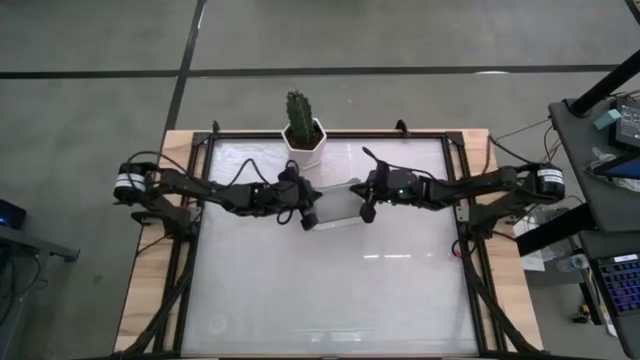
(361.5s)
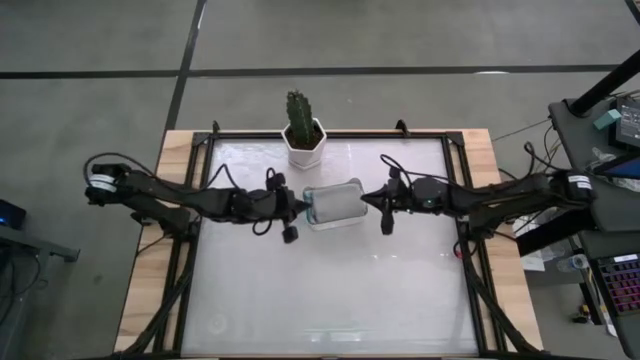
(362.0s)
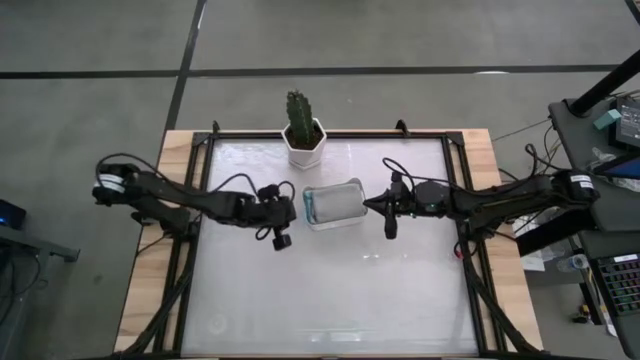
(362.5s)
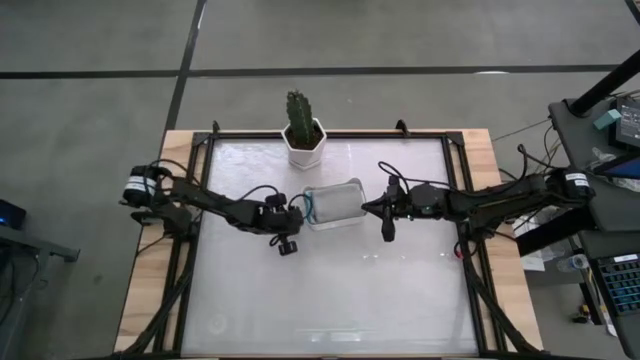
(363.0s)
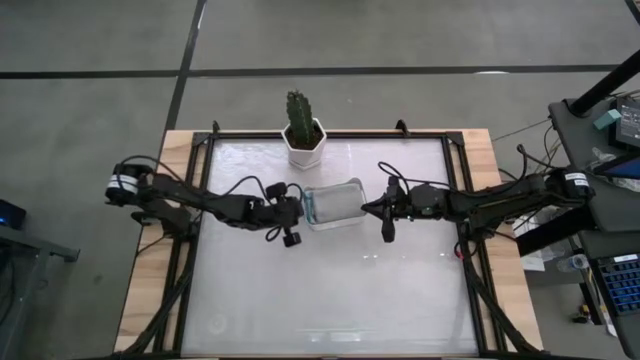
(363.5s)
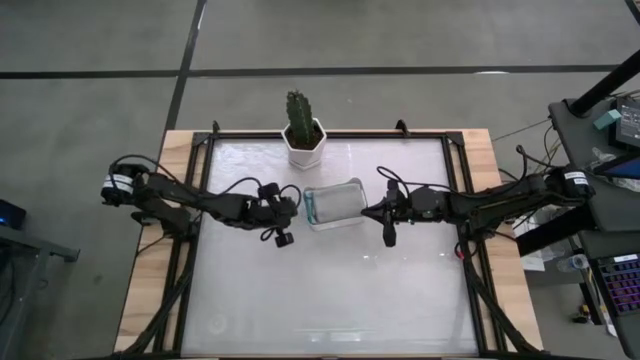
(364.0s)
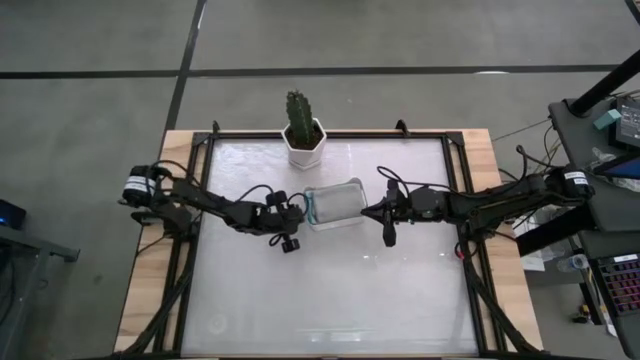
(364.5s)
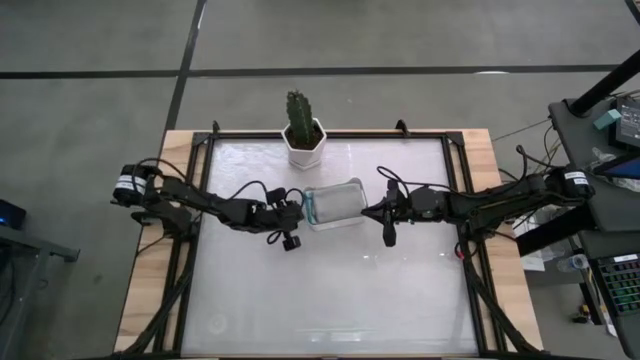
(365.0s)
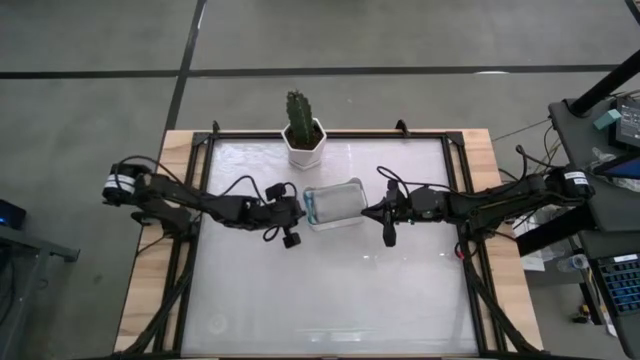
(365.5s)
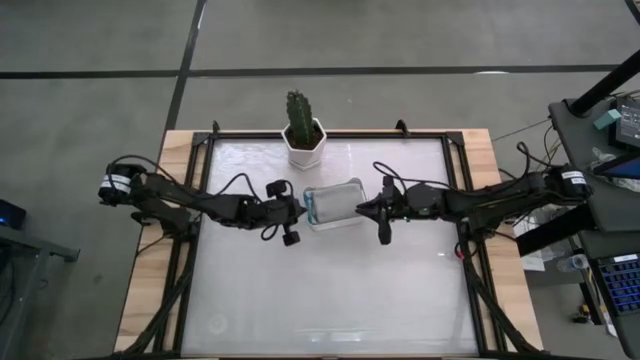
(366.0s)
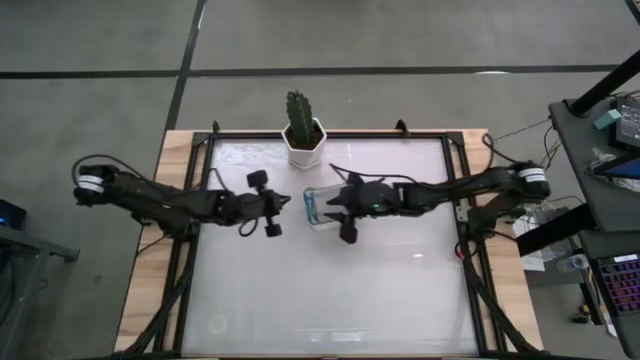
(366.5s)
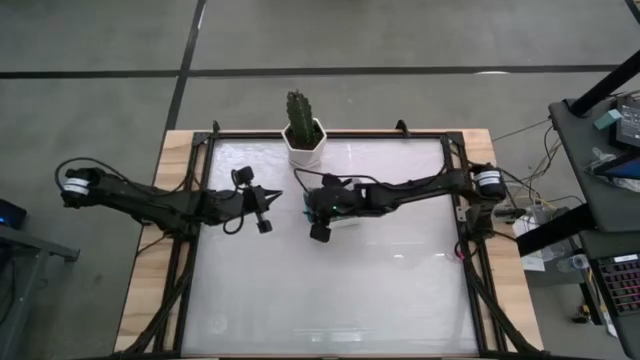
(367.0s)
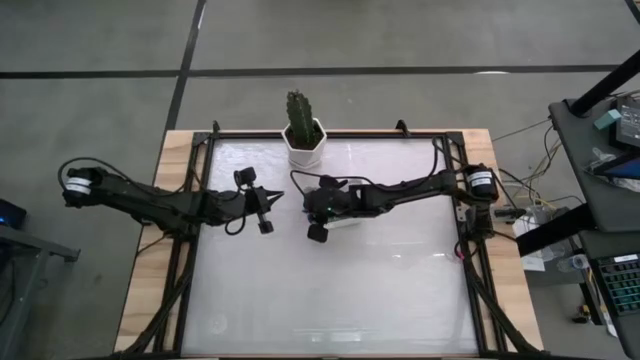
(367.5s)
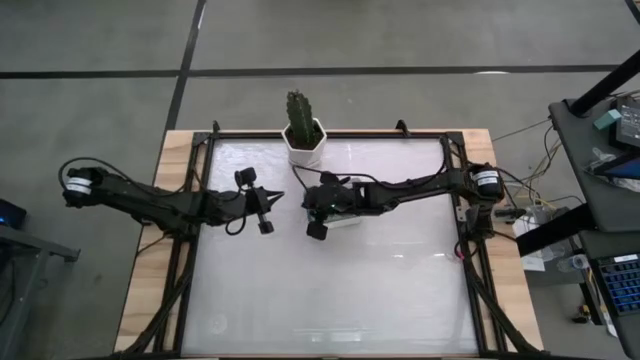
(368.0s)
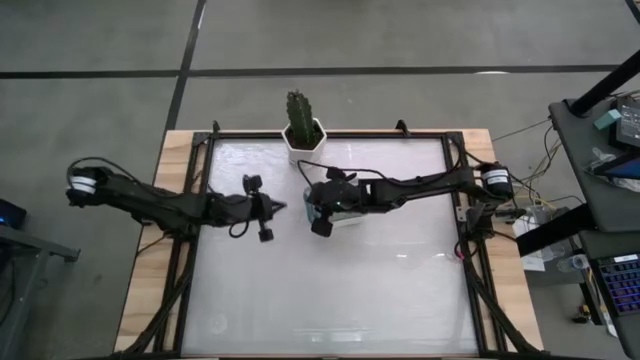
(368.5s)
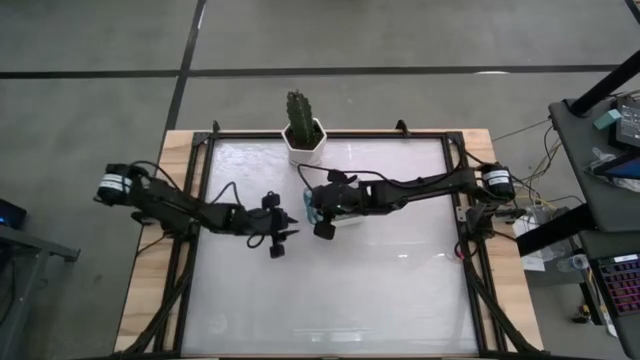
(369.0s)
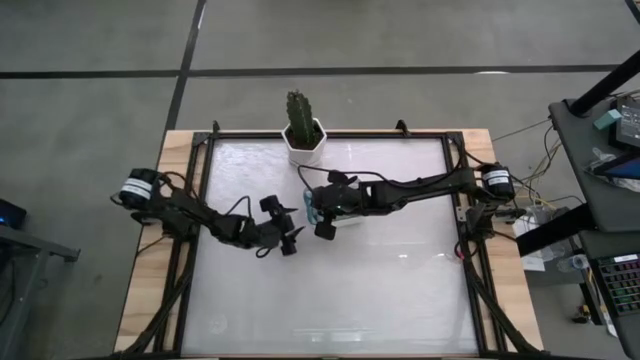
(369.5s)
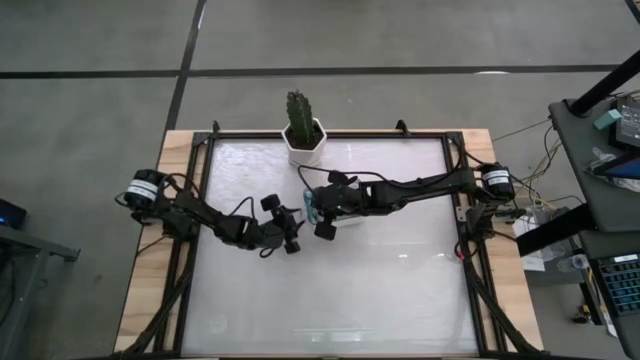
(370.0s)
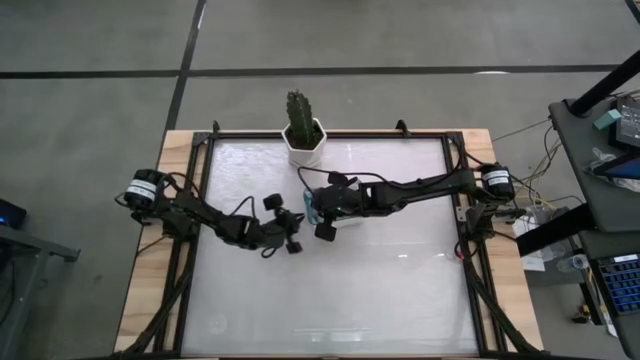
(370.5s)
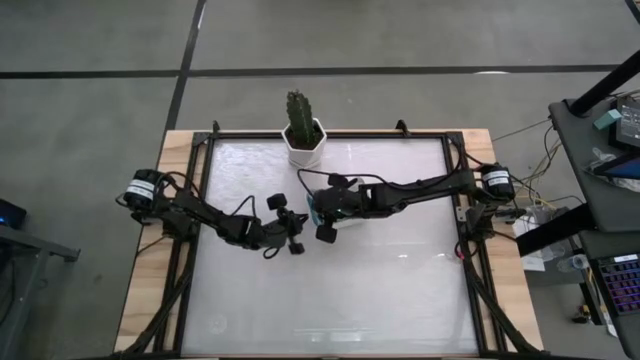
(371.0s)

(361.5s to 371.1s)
Task: Fold microfiber towels
Adjust the white tag

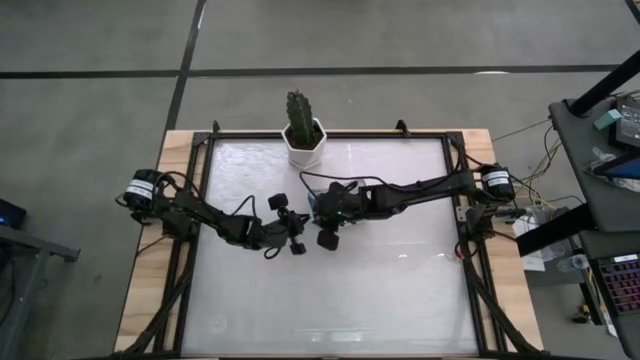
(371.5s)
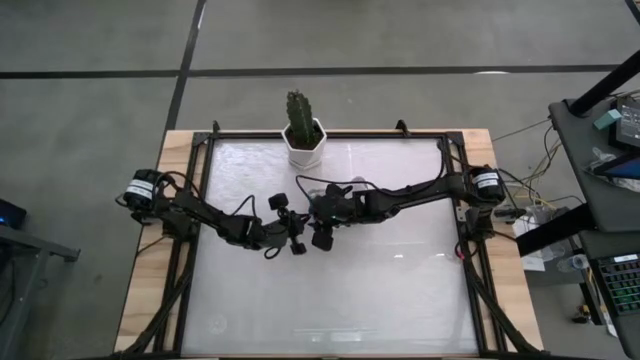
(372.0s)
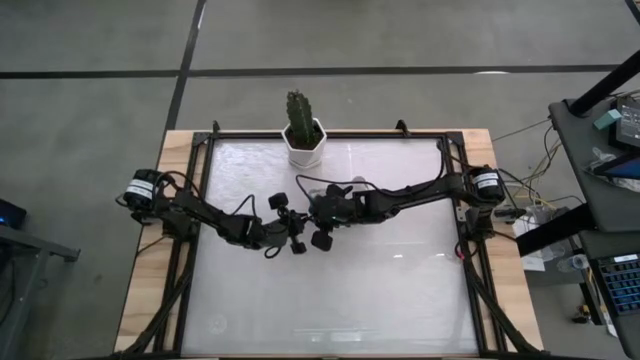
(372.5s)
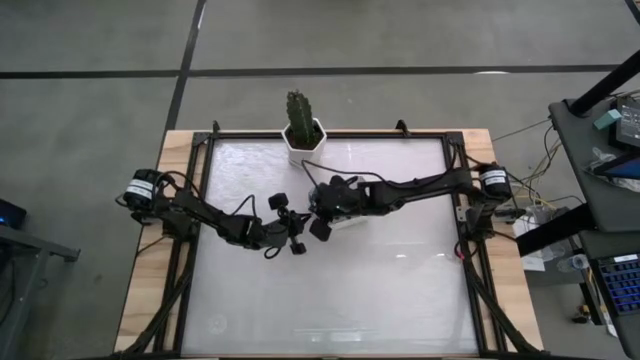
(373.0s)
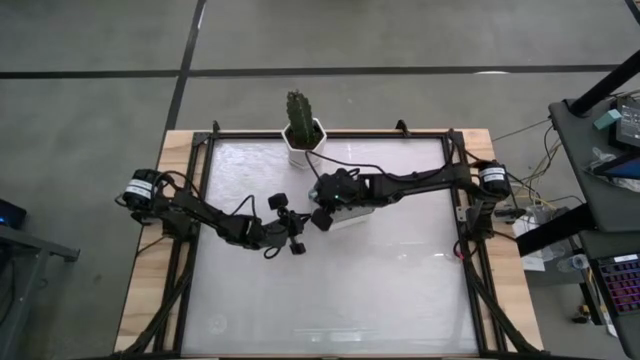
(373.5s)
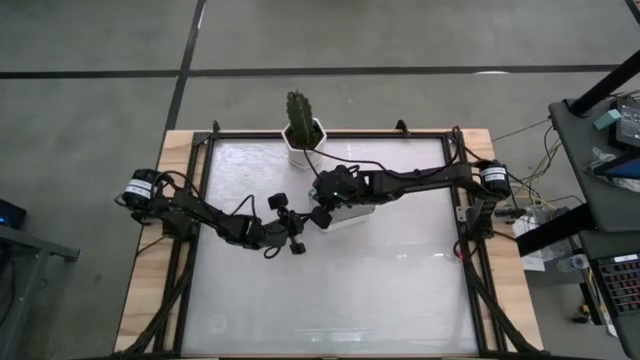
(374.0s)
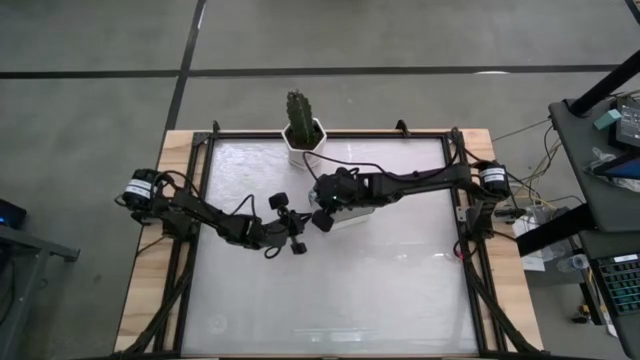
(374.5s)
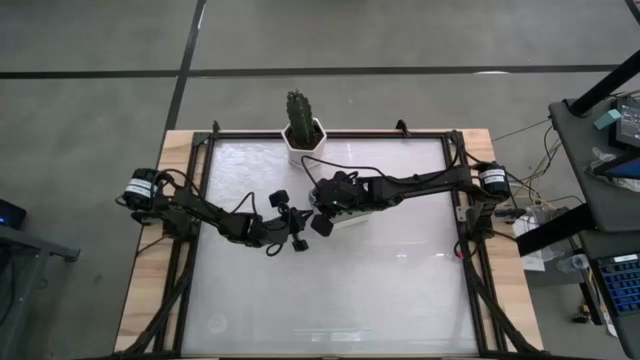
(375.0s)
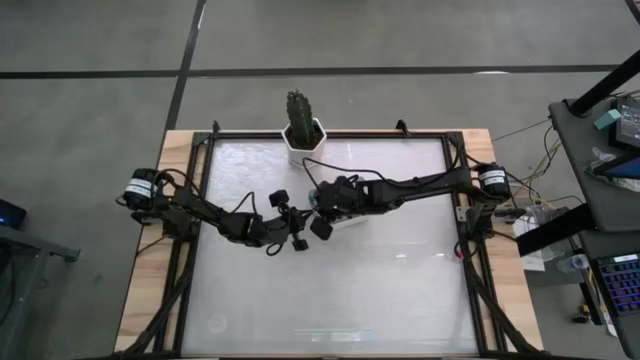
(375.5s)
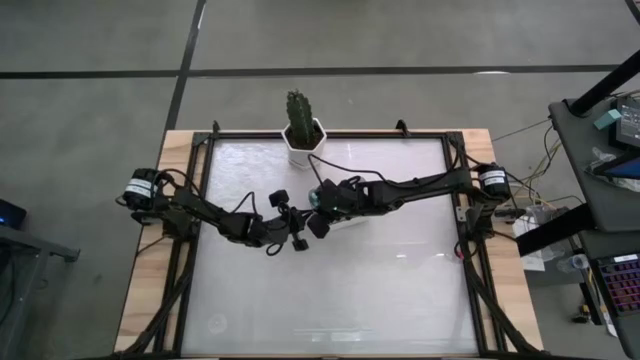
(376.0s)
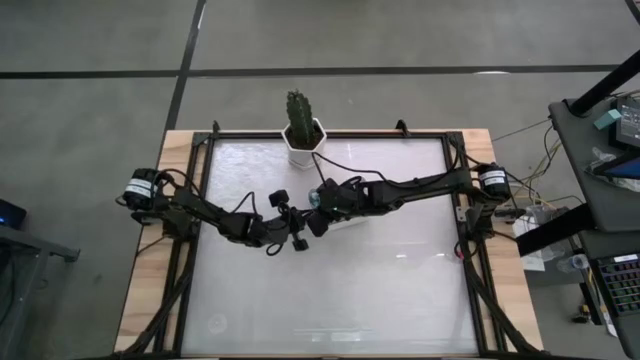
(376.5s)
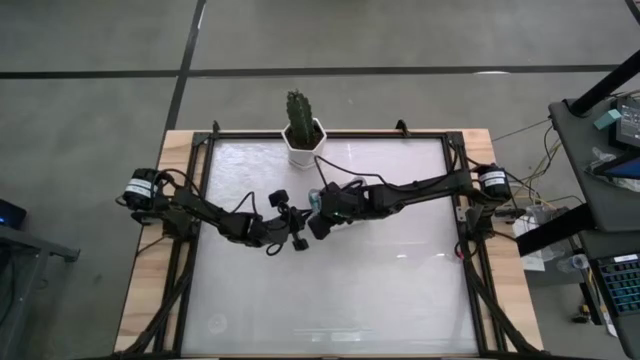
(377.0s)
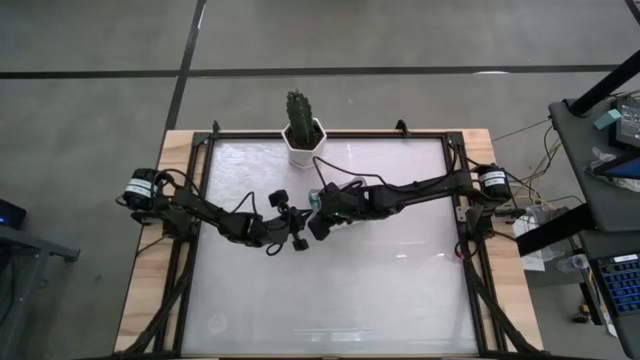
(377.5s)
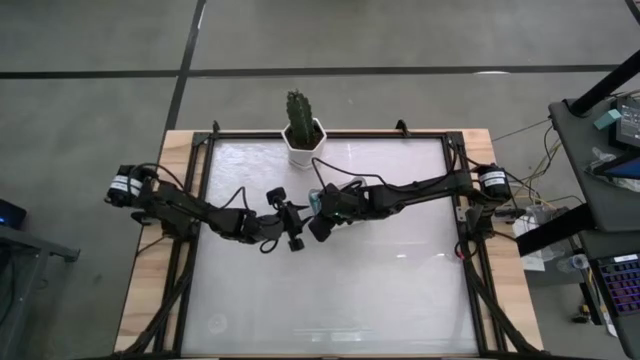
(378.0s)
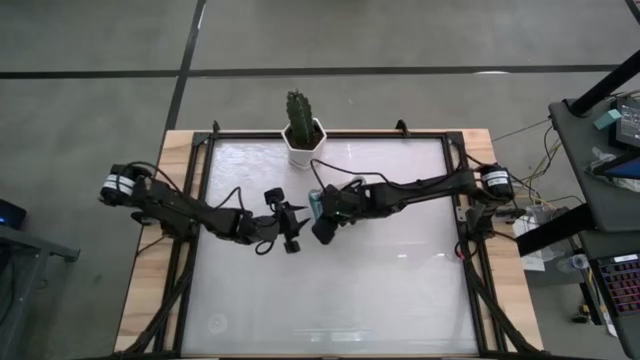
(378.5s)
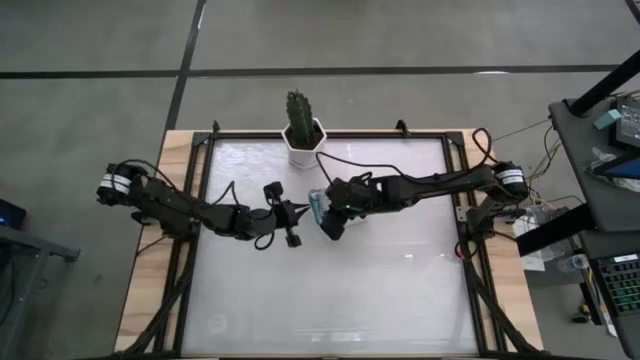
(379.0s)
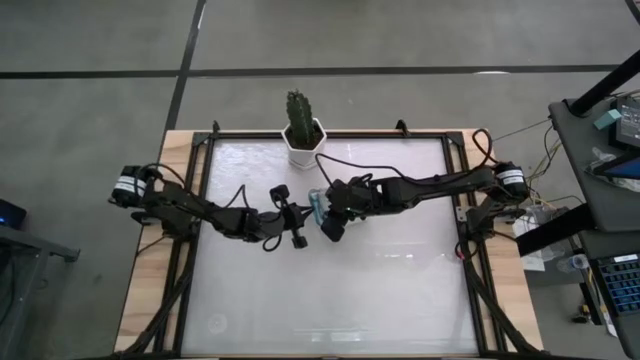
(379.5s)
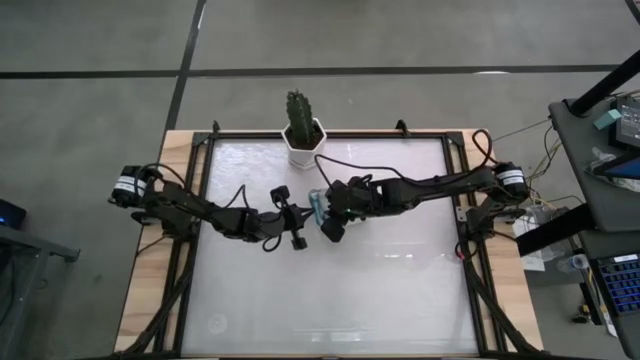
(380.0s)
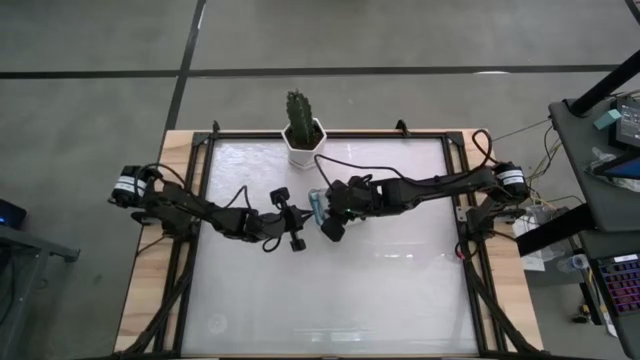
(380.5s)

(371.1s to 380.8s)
Adjust the white tag

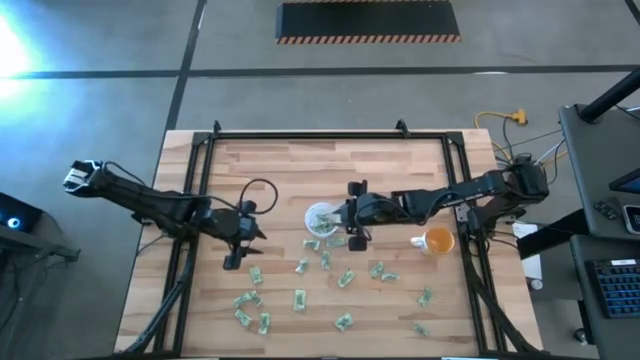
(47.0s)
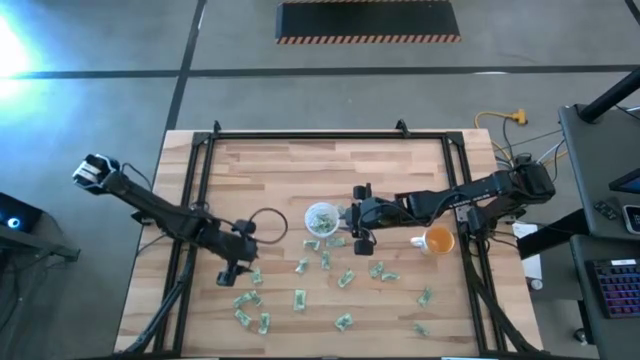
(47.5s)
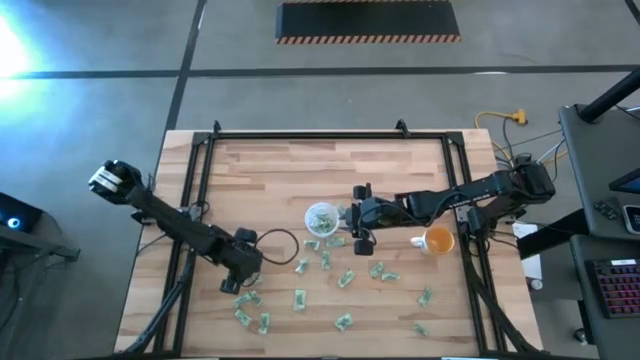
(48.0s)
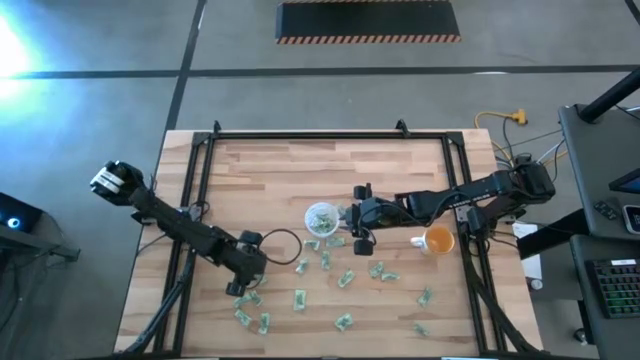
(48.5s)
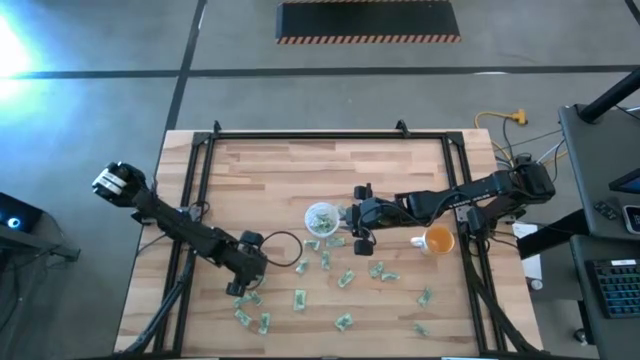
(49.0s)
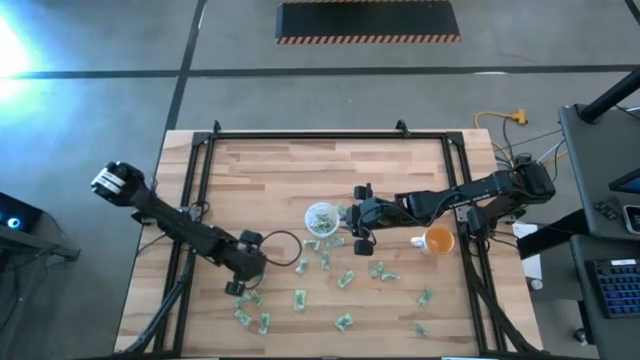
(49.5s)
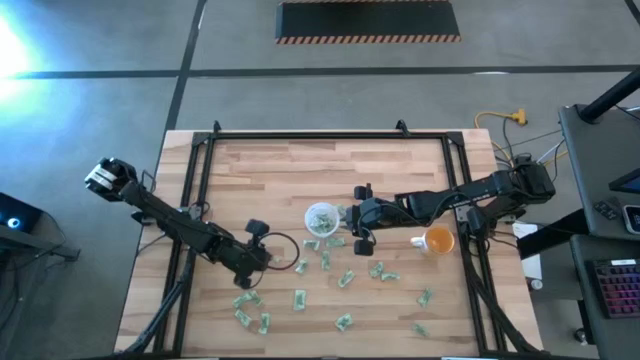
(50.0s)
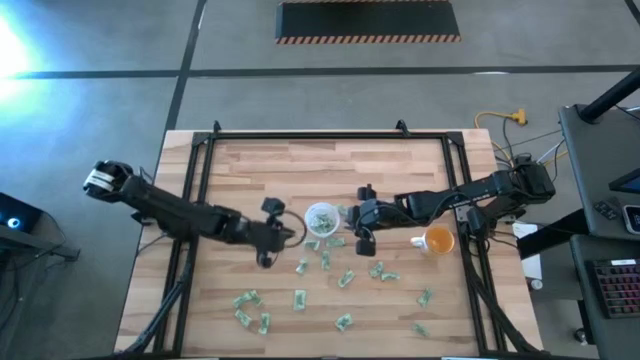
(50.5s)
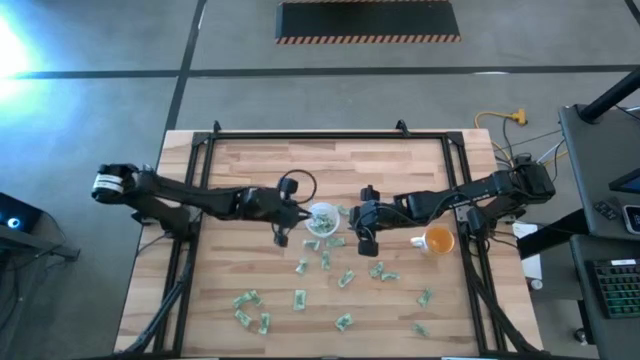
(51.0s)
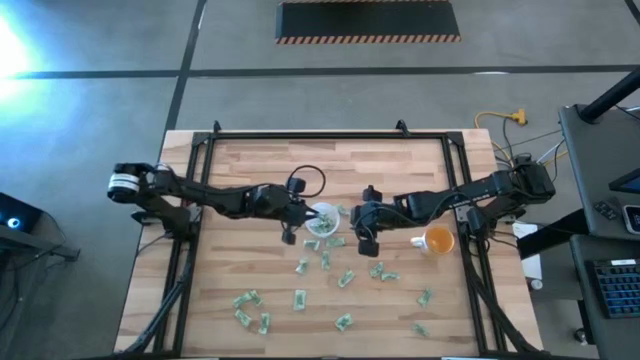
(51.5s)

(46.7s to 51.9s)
Task: Pick and place Stevia / Truvia into bins
Put the light green stevia packet into the transparent container
